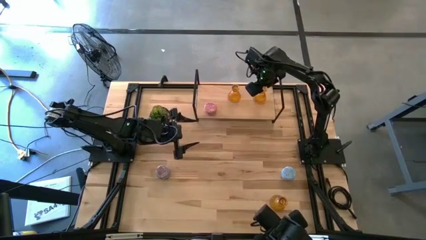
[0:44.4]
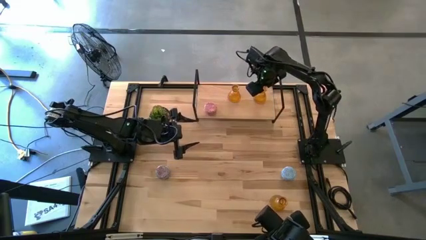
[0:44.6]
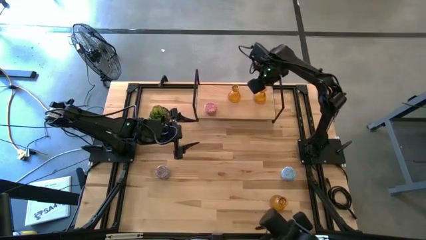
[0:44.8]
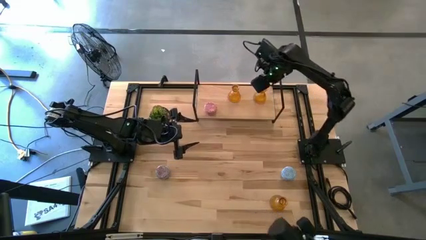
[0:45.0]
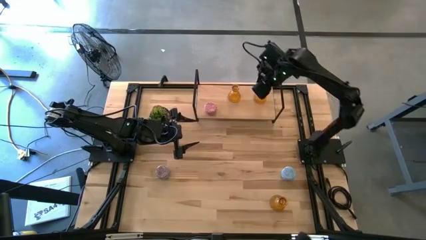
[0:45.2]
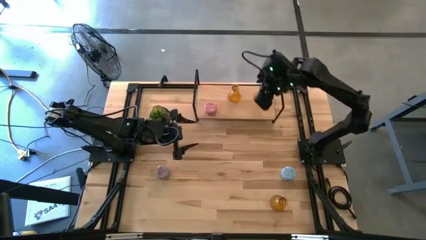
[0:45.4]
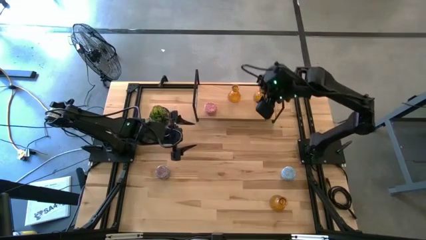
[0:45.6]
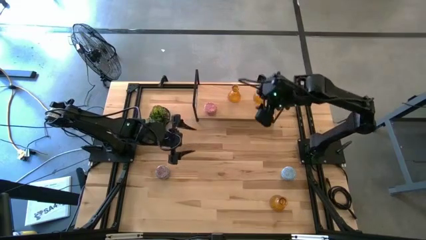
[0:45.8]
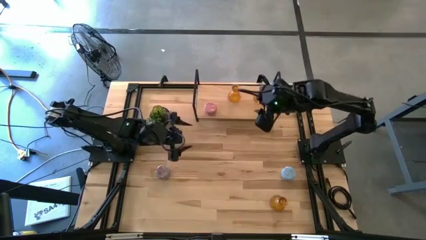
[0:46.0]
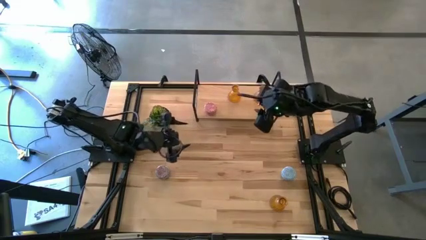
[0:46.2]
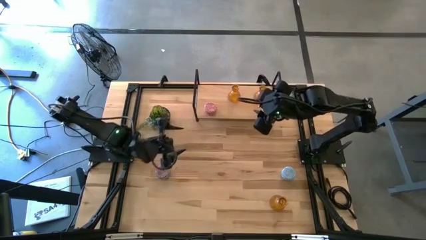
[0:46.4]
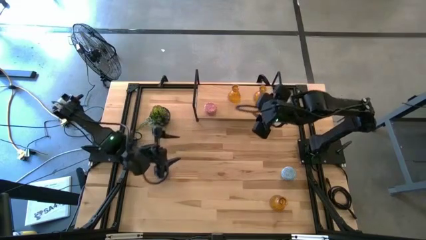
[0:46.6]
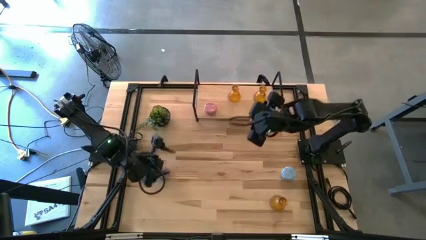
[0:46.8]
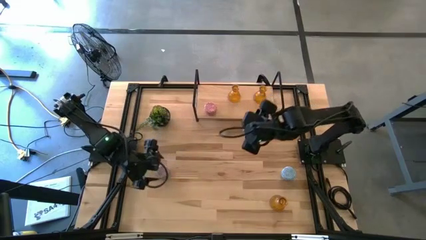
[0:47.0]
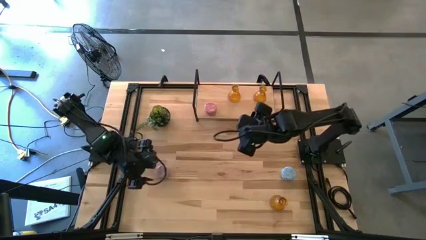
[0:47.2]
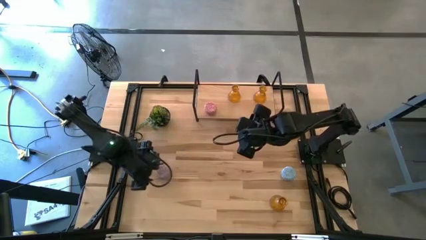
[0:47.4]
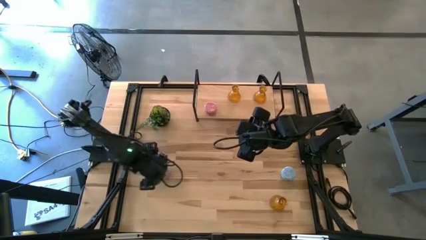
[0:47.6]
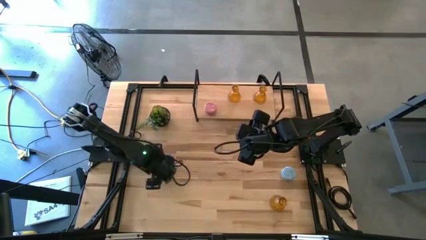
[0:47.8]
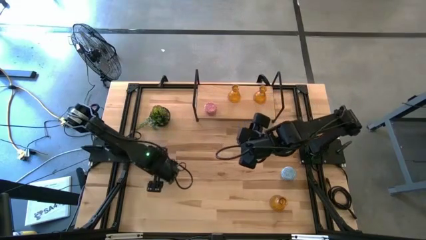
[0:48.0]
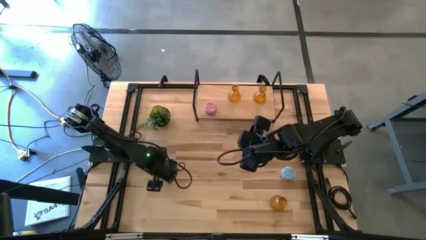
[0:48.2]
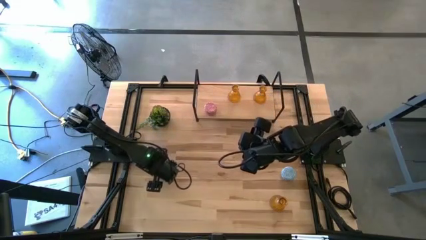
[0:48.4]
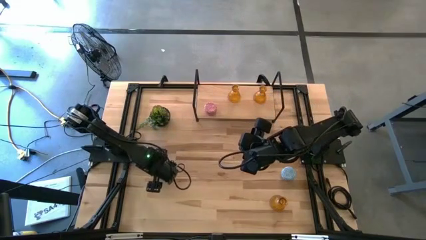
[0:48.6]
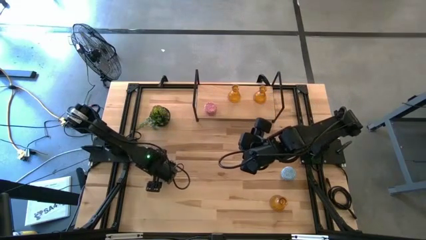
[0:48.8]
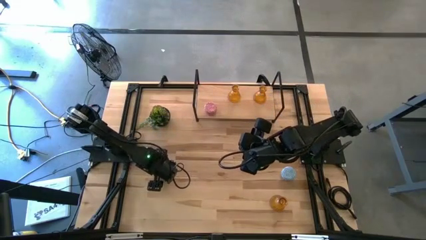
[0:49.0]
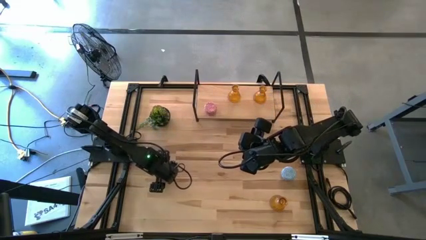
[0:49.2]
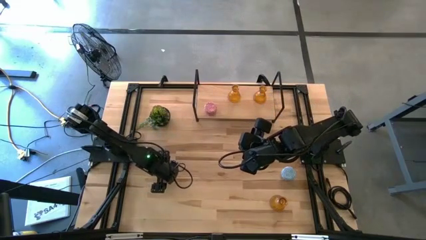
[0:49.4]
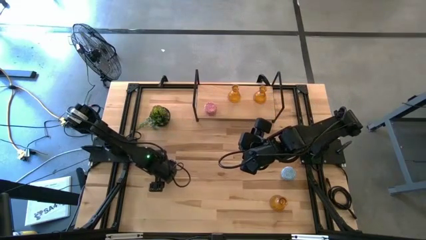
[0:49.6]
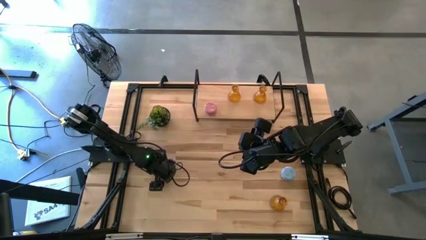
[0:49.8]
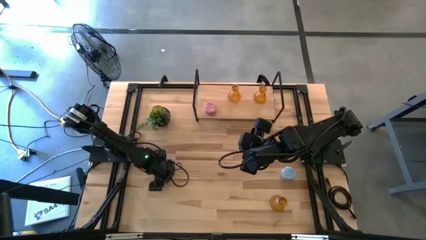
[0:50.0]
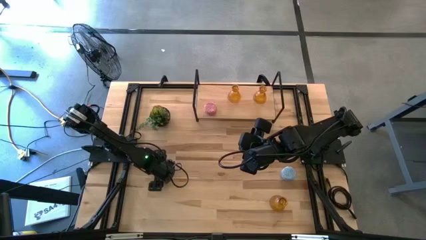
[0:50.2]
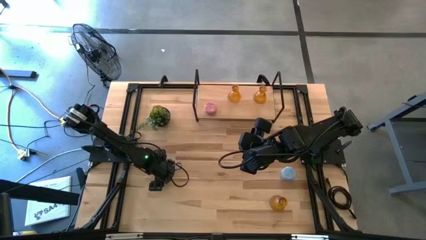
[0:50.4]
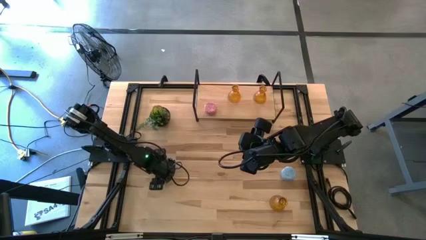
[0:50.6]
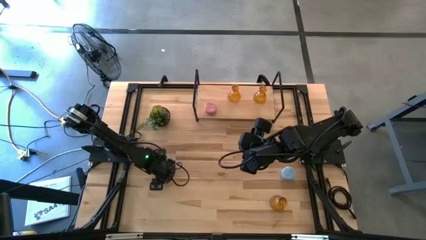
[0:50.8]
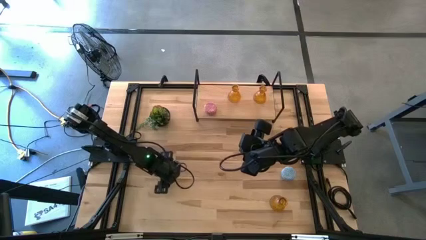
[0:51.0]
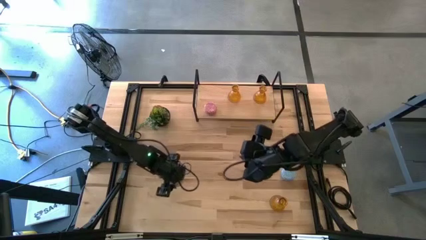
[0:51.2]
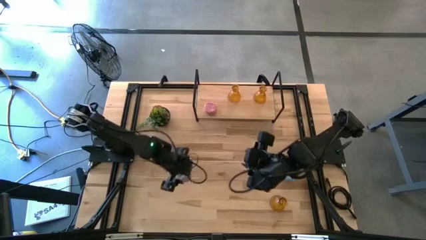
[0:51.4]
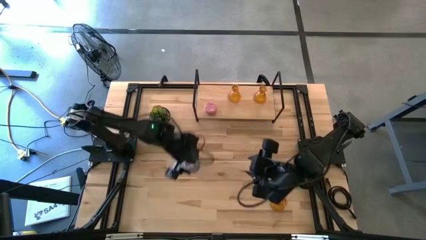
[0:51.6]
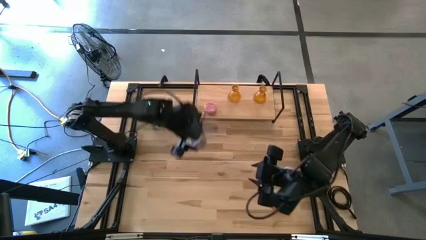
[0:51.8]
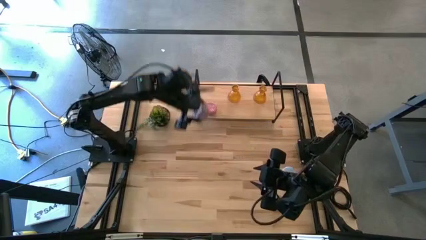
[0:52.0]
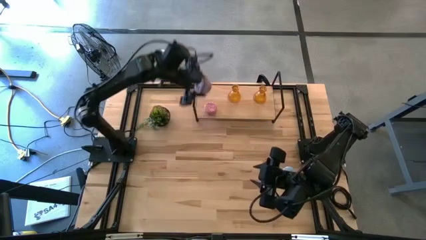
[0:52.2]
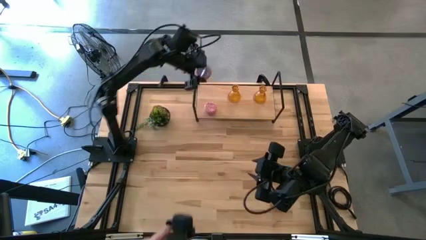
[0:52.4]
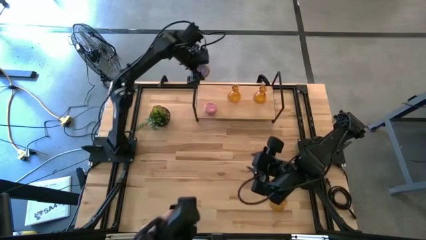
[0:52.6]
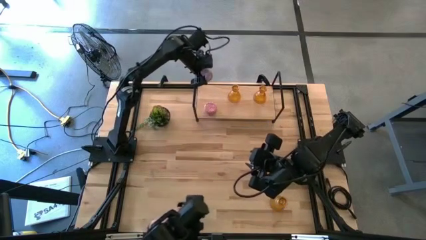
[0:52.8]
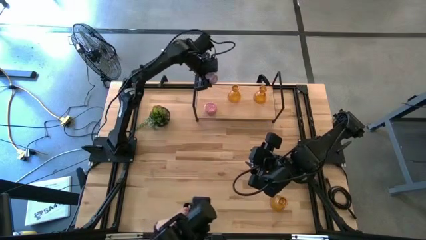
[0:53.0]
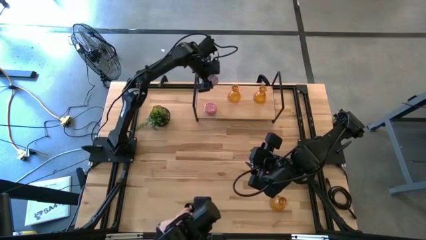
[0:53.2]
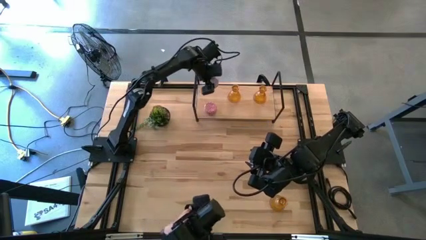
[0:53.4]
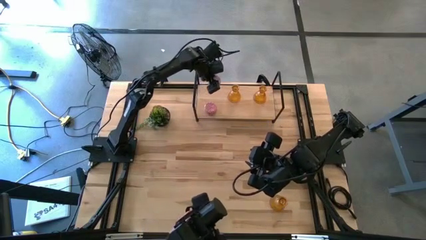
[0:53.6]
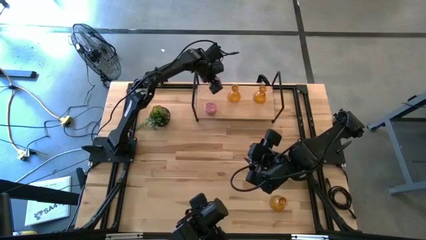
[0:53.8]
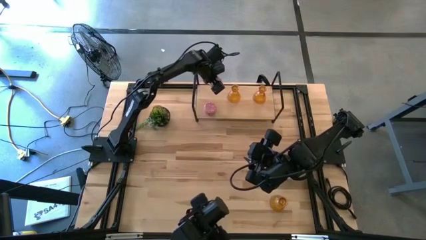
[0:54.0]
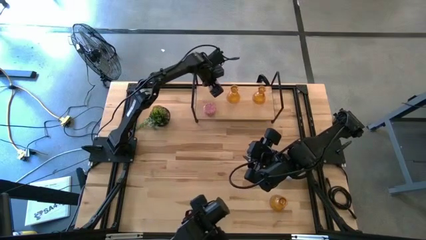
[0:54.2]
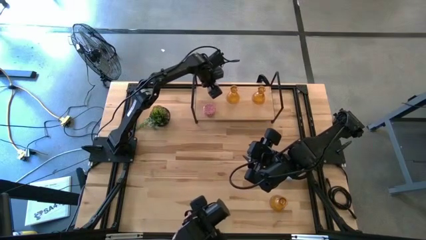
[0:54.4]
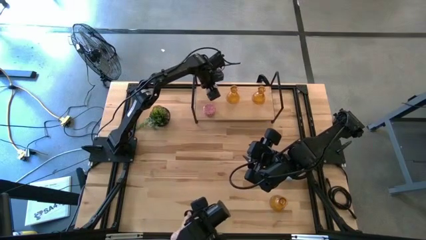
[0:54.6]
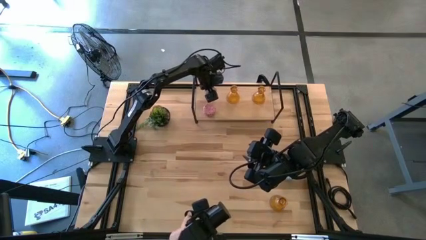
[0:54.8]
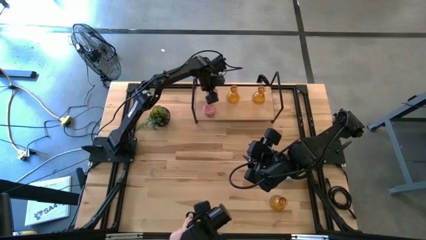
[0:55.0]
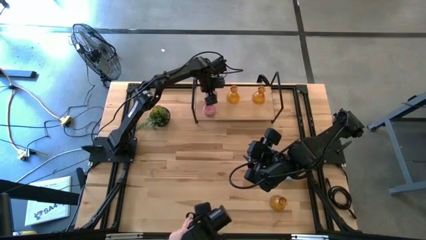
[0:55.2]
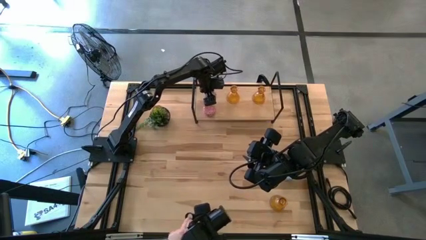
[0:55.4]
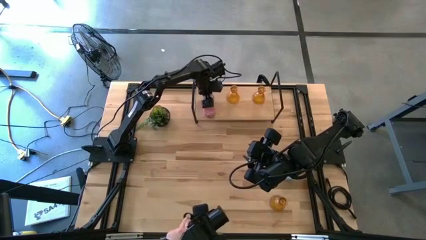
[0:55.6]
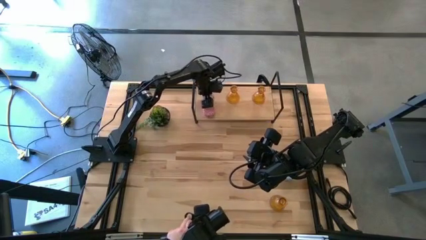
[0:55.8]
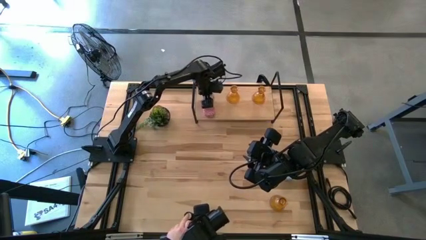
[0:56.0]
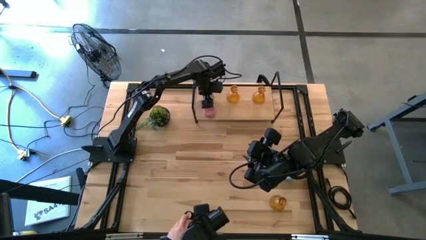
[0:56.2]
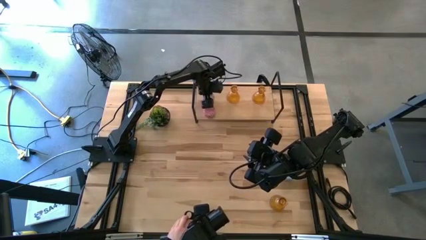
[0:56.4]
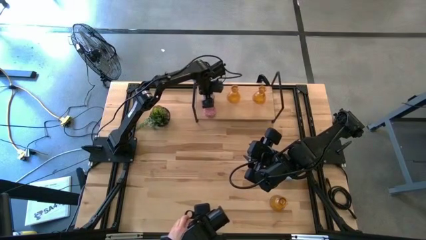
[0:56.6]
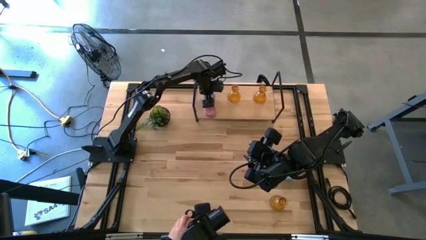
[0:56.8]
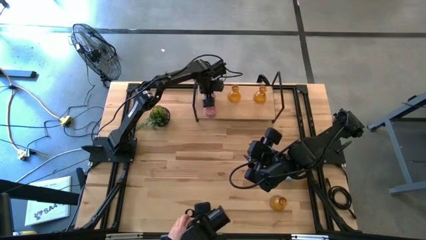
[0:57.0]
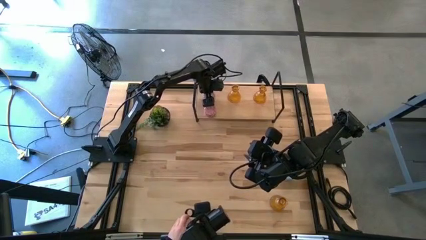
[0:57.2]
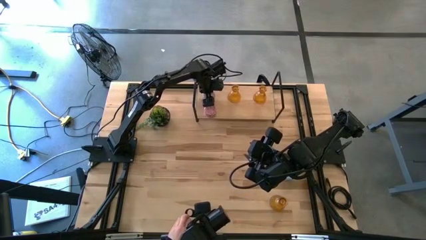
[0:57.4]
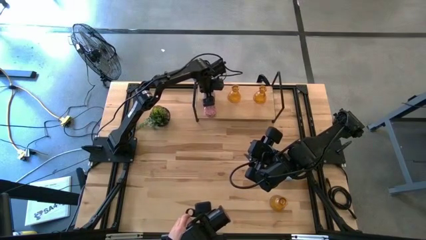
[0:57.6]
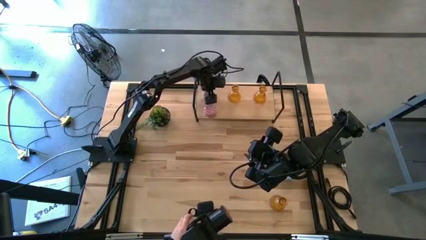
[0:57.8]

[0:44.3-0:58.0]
Task: Pick & Place candle stick holders
Put the red patterned scented candle on the shelf

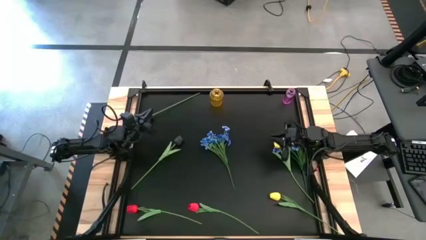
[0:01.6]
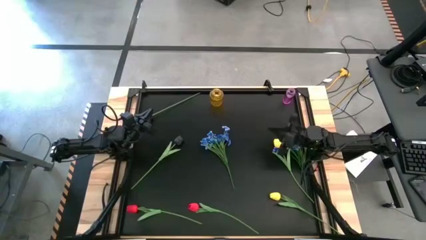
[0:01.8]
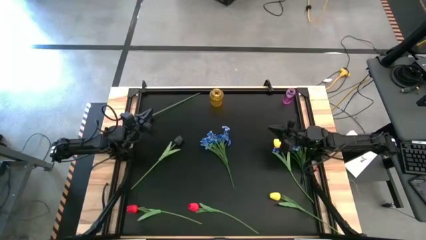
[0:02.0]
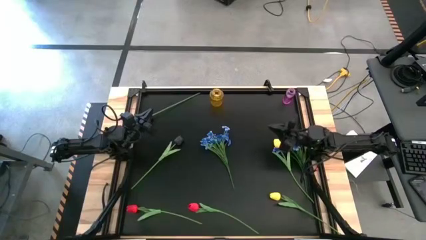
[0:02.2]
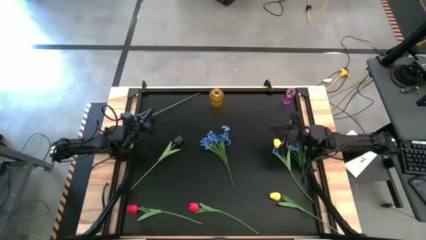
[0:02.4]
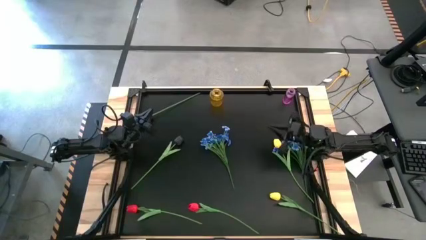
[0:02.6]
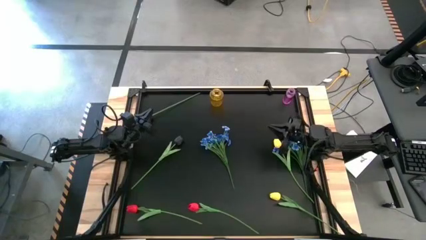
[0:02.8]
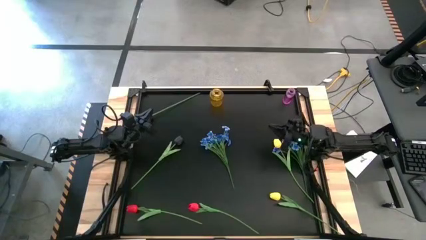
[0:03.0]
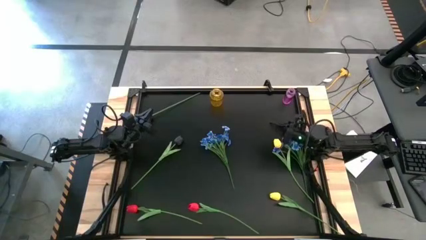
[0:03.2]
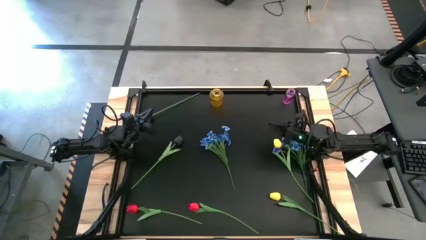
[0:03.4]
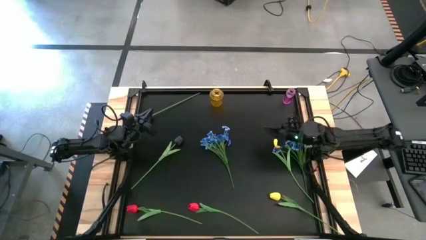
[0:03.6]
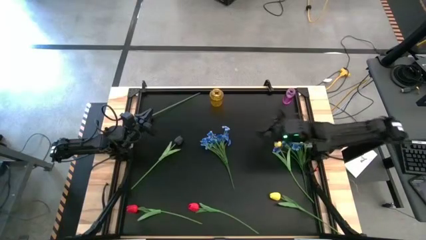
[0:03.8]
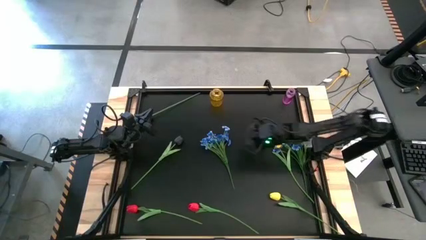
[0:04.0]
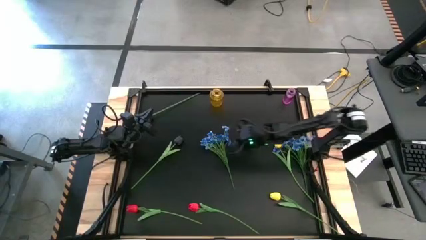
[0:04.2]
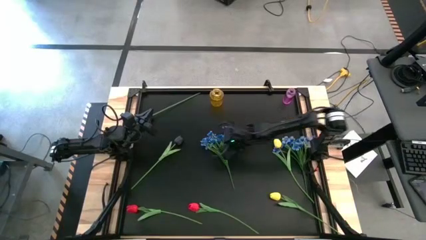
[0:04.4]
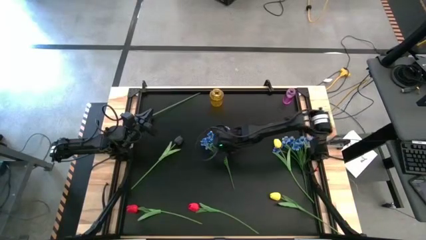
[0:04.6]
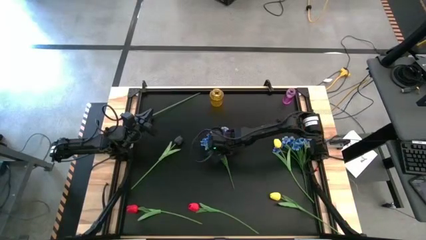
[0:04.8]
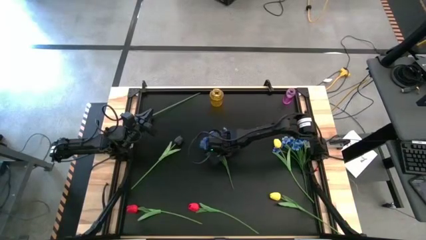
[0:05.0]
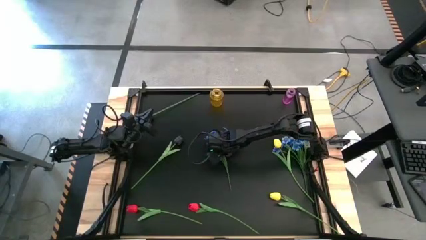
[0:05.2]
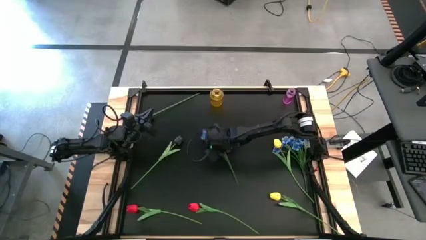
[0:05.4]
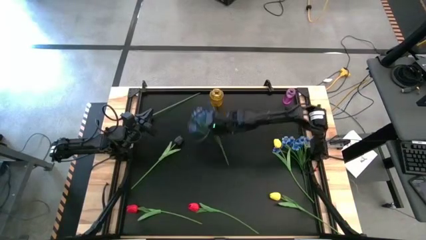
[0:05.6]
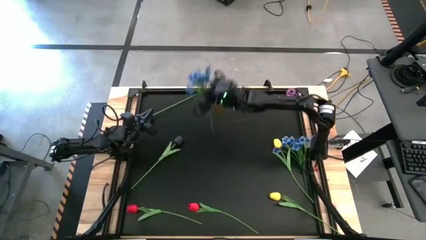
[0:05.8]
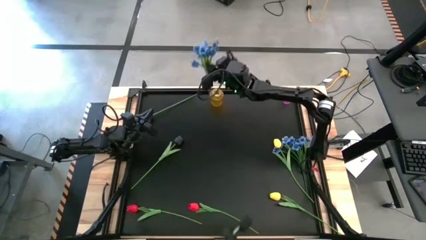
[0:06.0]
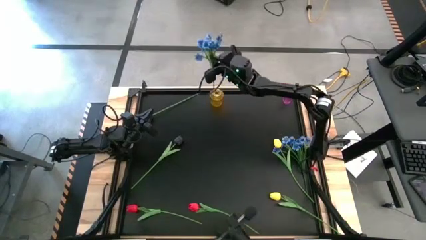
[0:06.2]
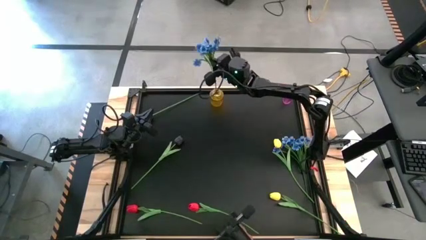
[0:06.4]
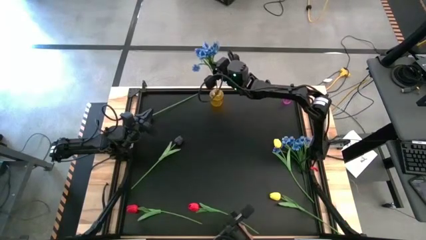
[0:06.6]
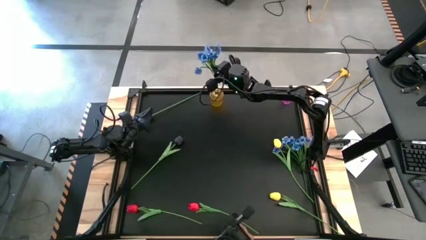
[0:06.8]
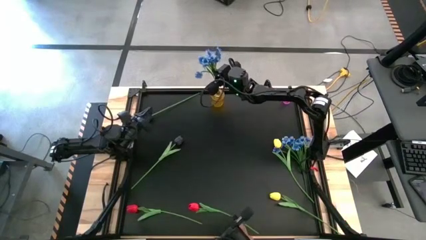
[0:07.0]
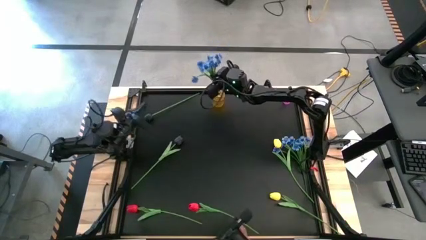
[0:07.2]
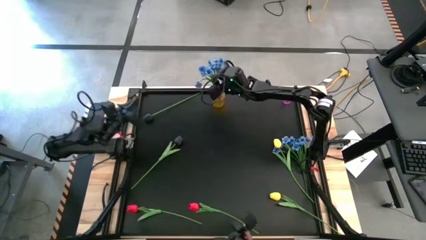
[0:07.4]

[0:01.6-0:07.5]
Task: Sort flowers into vase by color
Put the left blue flowers into the yellow vase
